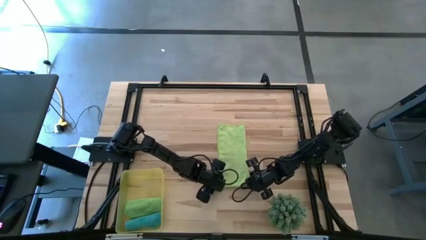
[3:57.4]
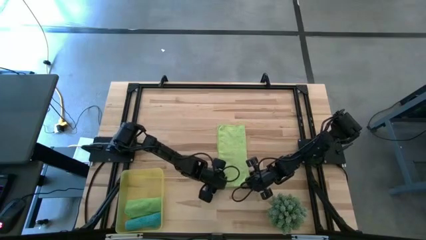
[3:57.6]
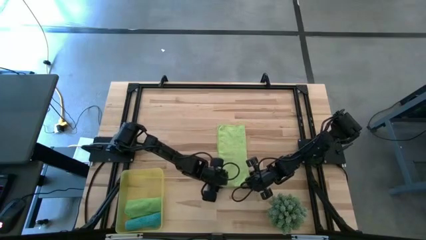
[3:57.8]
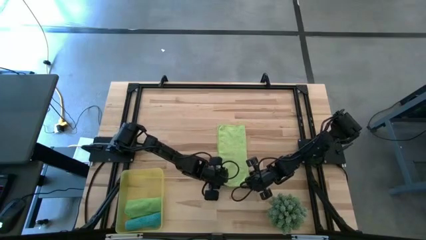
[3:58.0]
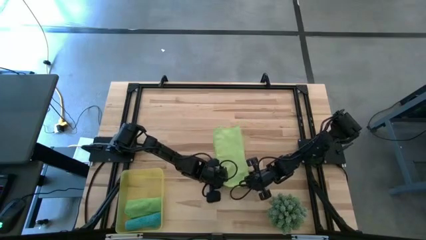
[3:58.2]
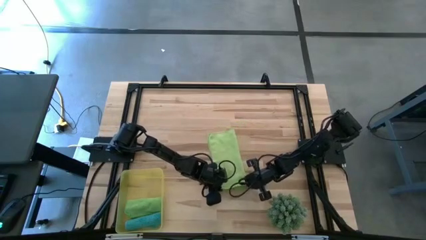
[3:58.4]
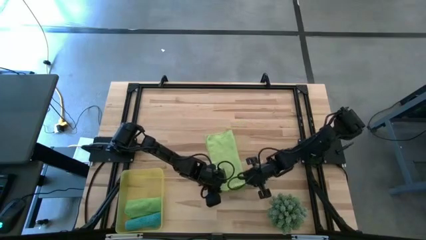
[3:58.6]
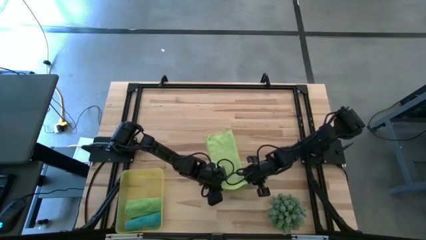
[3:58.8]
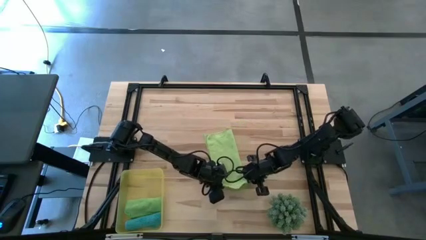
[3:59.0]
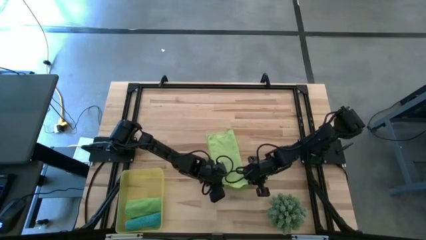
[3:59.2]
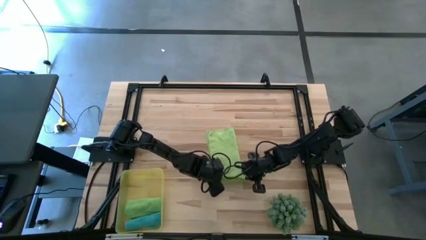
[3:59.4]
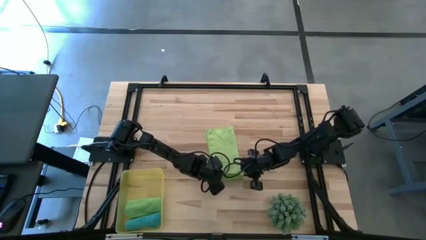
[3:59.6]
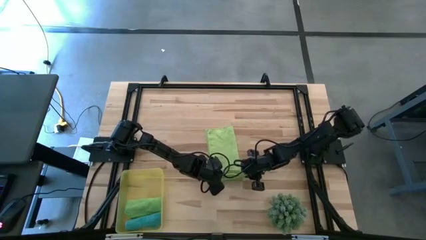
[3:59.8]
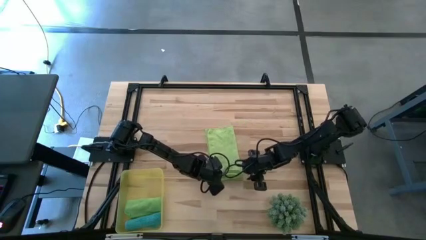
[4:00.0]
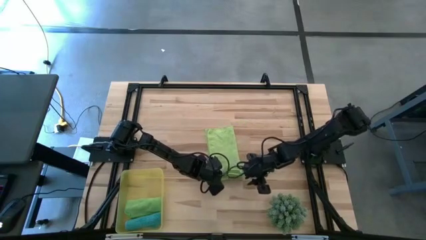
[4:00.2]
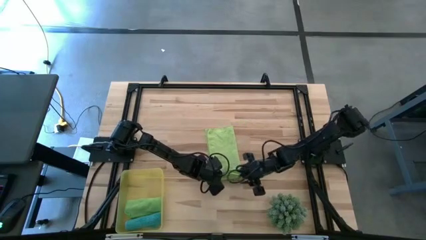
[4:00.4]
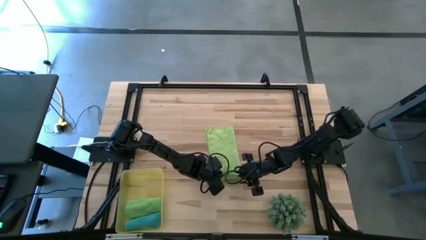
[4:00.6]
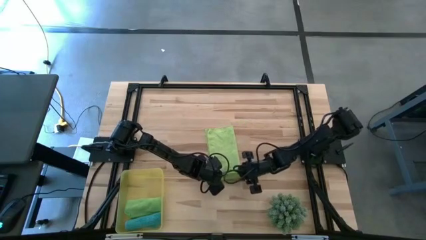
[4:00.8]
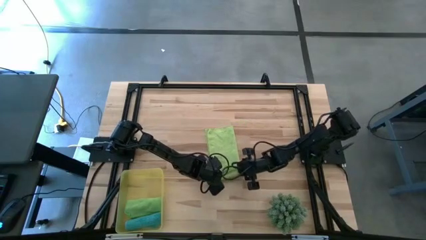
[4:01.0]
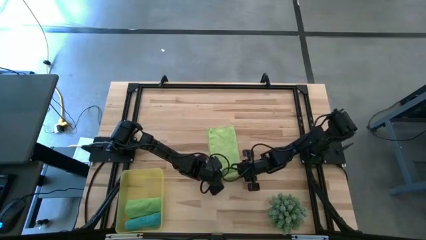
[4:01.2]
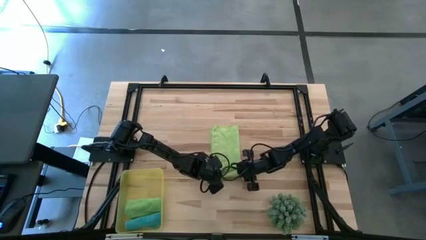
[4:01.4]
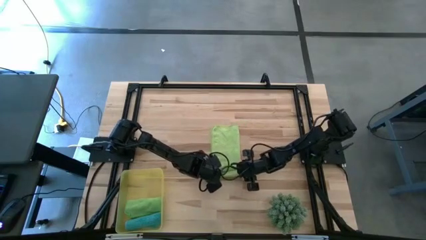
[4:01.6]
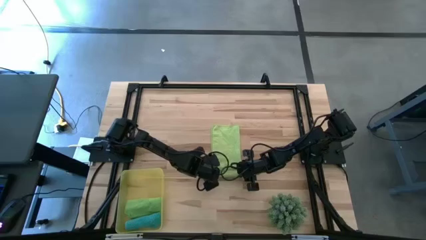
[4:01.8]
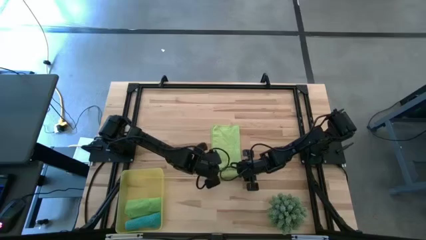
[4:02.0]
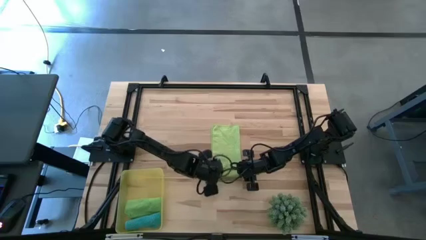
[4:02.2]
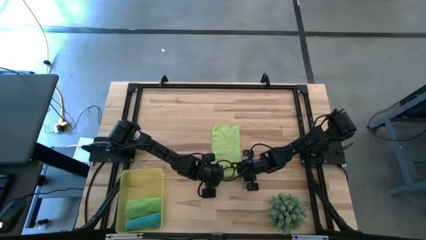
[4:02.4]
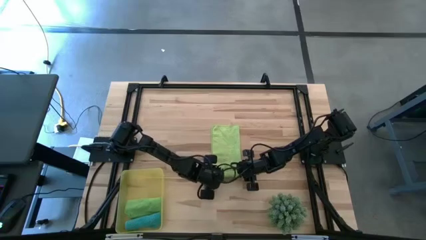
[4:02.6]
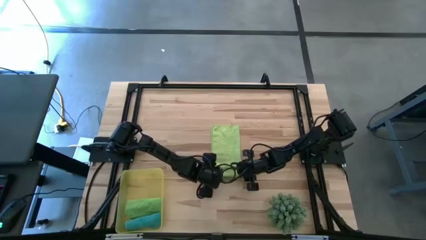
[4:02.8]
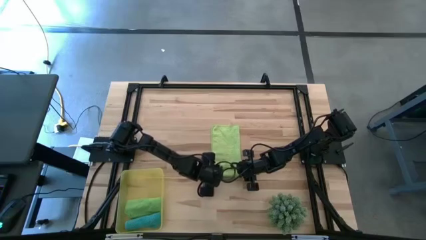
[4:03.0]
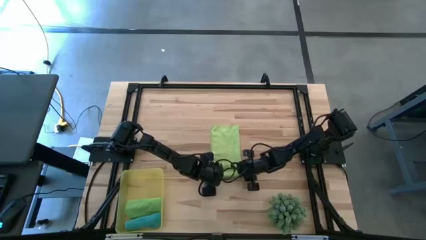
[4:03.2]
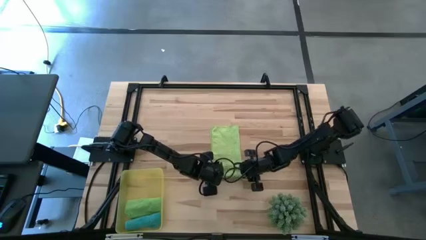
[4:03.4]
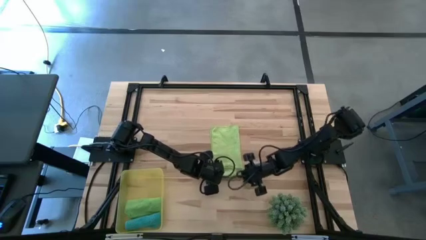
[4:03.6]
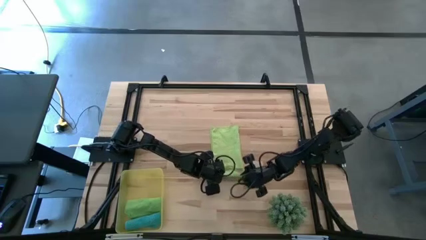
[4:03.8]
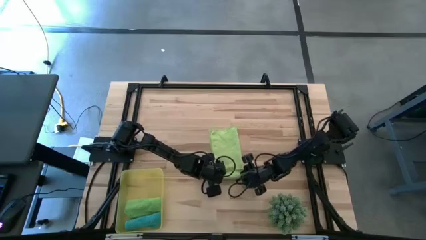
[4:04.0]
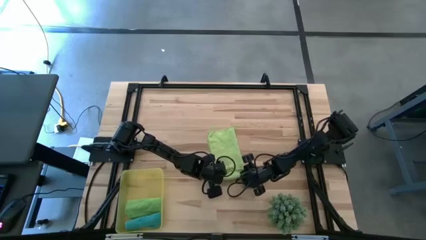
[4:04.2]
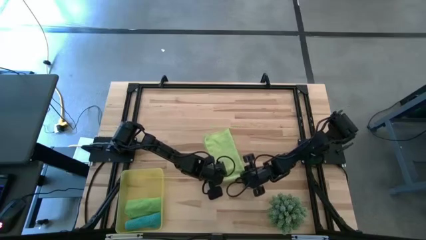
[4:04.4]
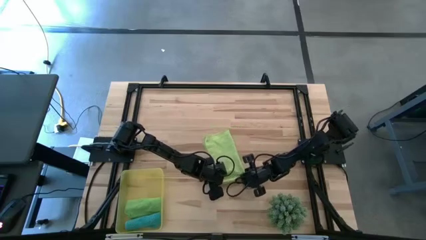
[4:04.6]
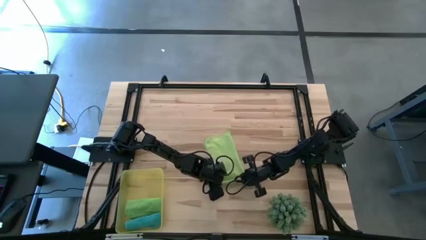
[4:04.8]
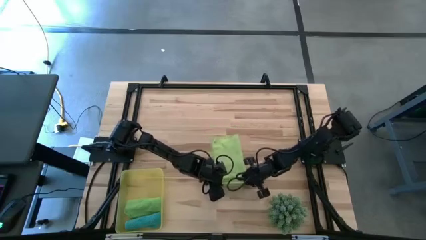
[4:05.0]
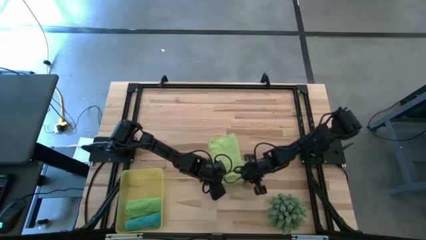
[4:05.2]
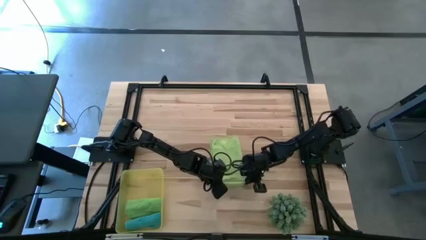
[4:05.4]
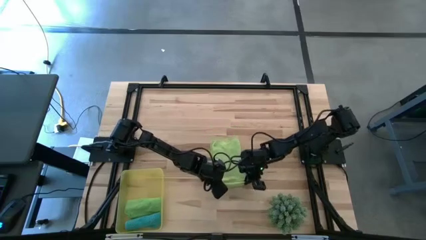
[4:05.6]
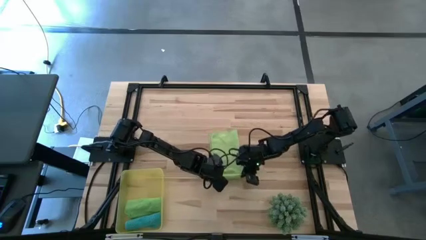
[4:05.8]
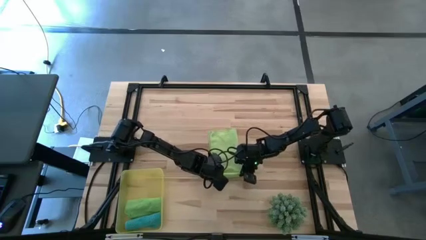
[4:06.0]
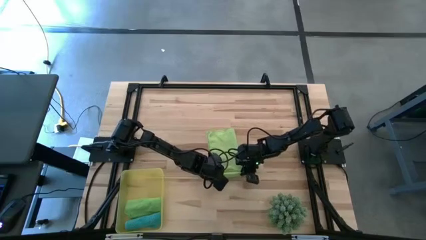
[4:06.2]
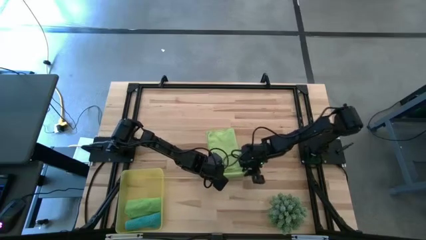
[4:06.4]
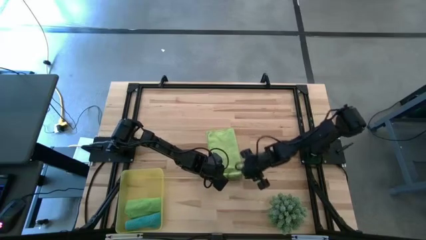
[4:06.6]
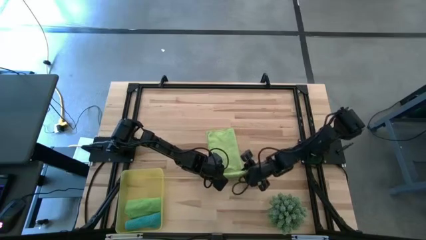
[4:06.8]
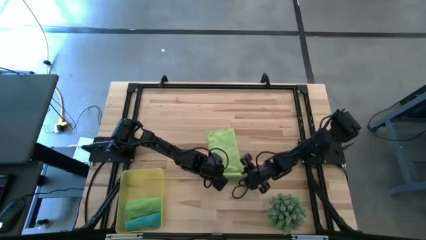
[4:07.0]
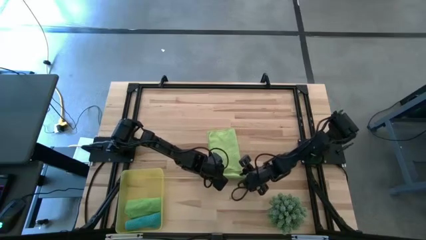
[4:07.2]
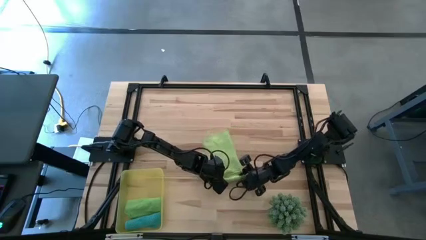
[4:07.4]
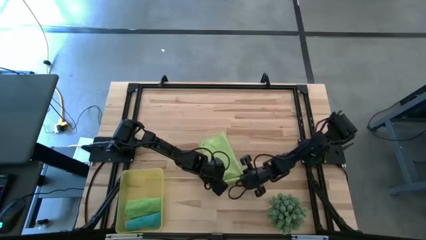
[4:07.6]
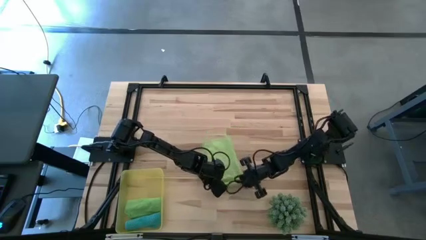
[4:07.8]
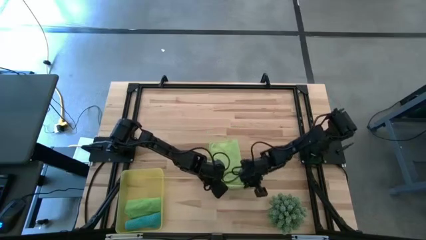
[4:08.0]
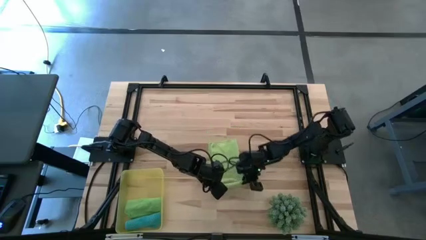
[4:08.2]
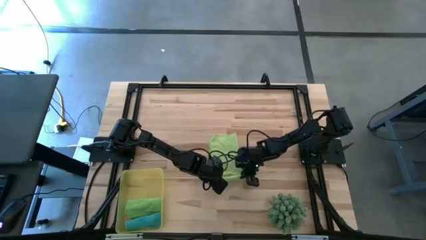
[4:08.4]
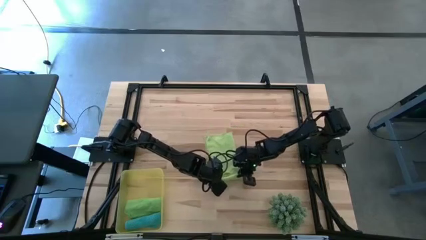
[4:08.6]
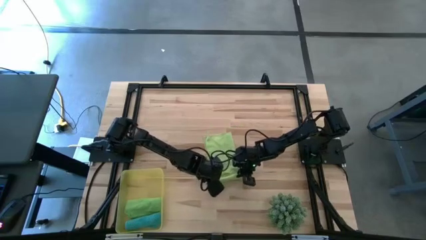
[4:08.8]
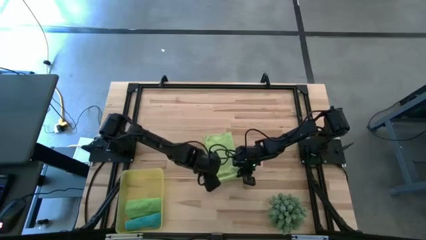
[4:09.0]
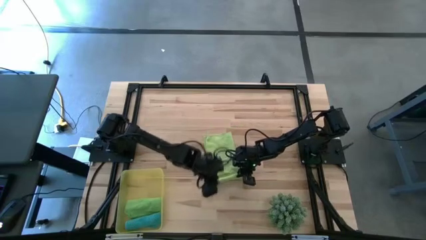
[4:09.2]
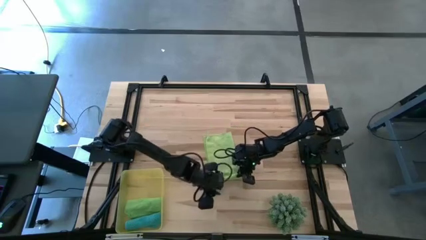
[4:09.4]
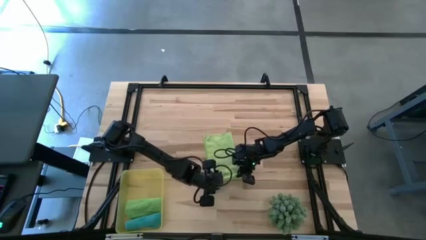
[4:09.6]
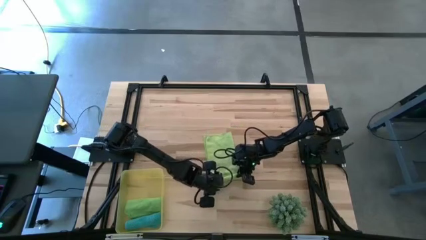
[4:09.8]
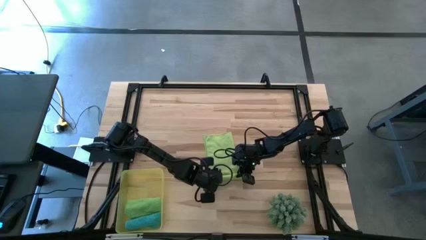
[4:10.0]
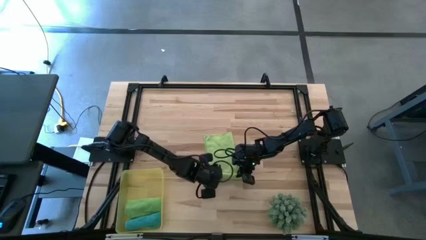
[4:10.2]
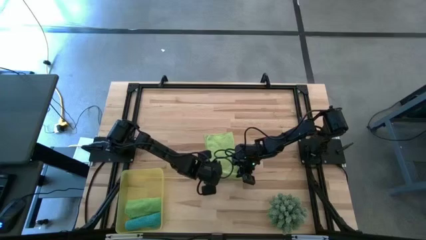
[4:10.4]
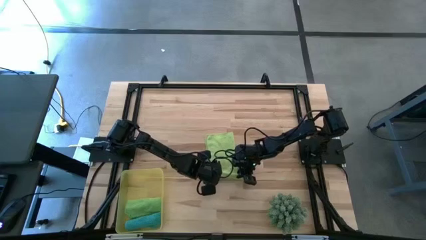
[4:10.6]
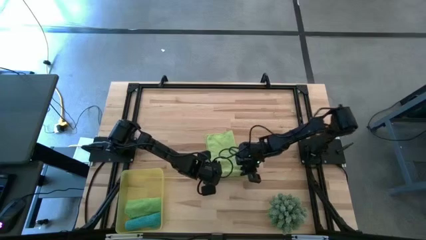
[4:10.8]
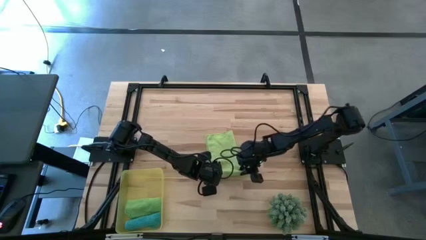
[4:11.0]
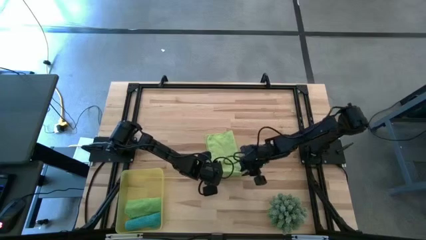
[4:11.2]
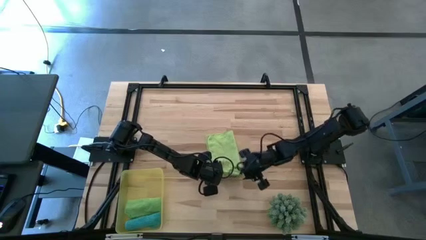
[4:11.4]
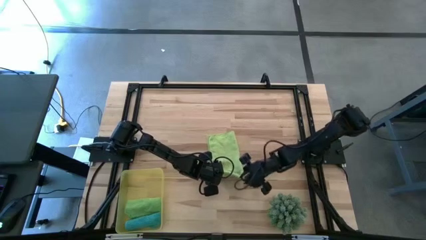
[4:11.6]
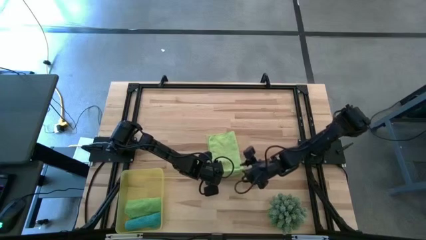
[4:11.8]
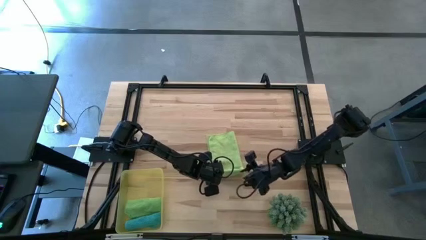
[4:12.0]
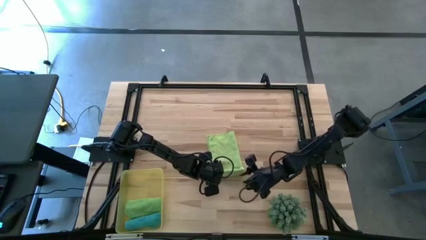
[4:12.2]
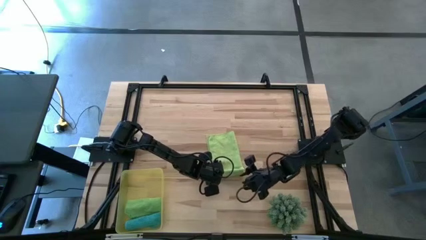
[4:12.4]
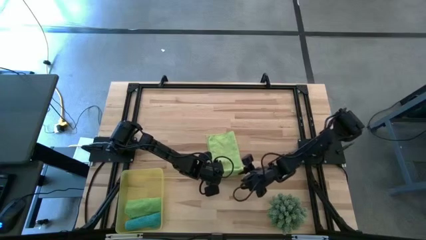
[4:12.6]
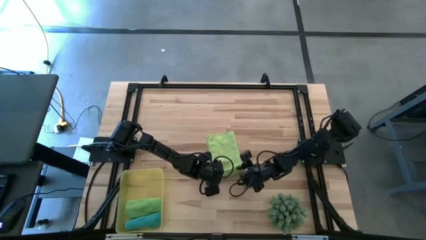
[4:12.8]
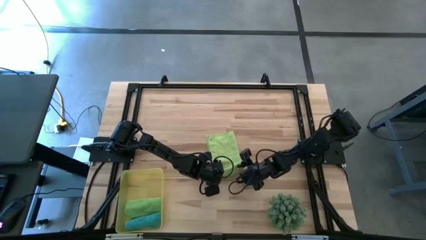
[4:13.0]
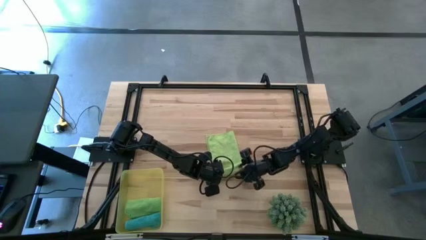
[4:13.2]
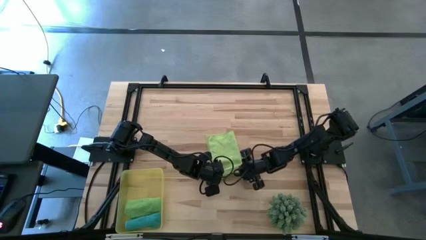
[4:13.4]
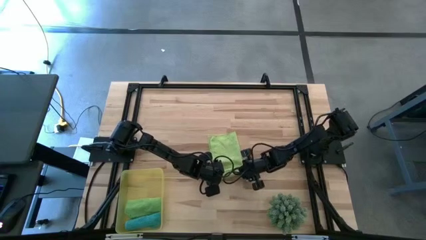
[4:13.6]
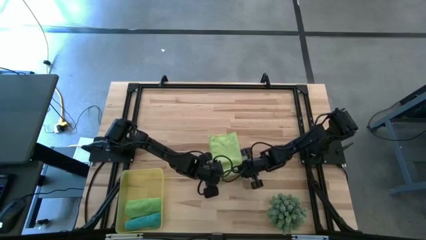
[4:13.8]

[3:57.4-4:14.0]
Task: Roll microfiber towels into tight, uniform cylinder then place into a basket
Roll the light green microfiber towel
